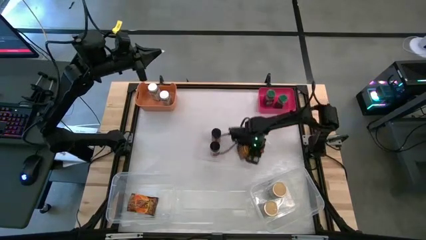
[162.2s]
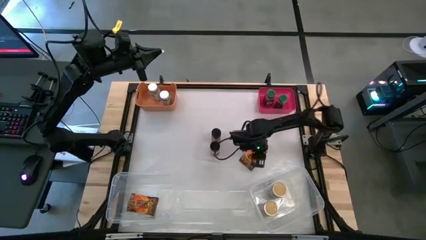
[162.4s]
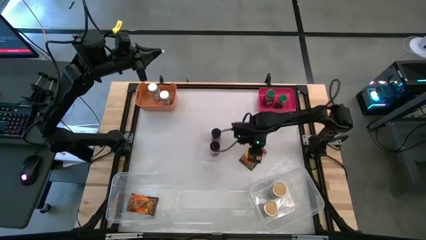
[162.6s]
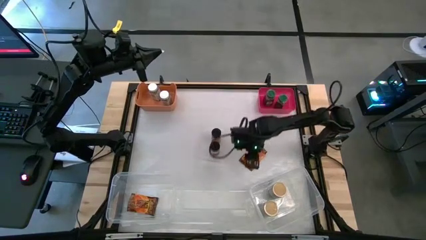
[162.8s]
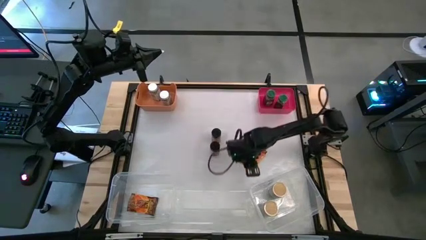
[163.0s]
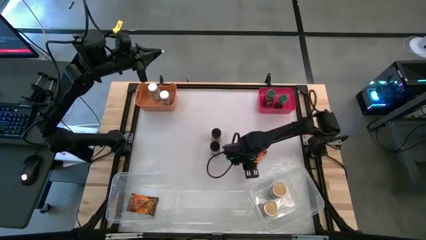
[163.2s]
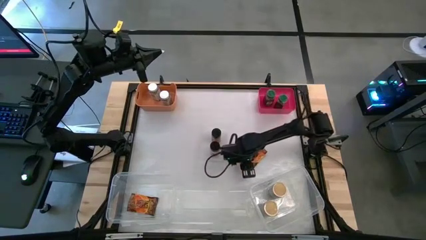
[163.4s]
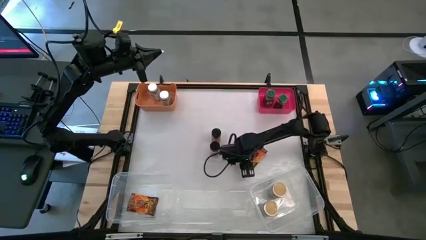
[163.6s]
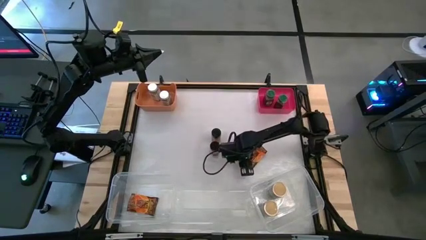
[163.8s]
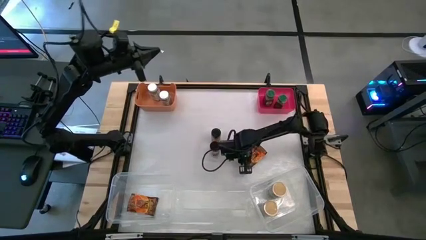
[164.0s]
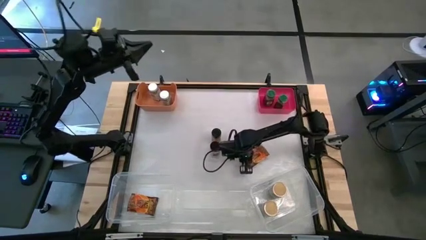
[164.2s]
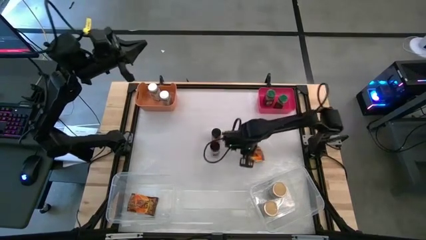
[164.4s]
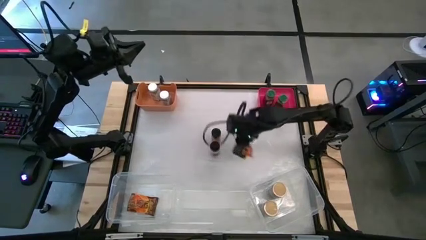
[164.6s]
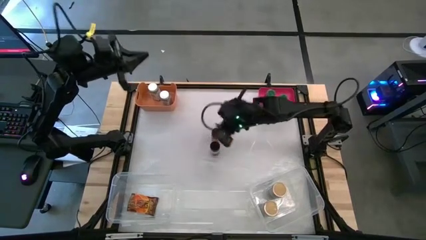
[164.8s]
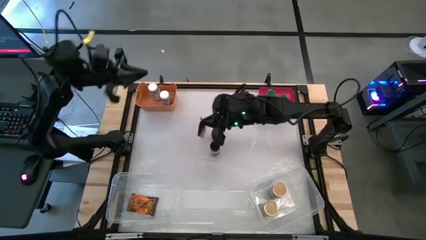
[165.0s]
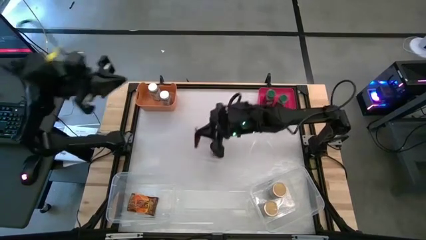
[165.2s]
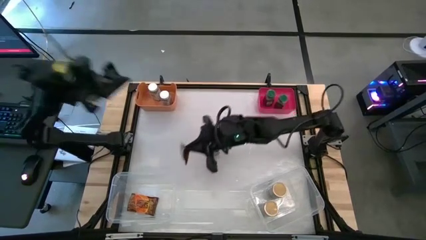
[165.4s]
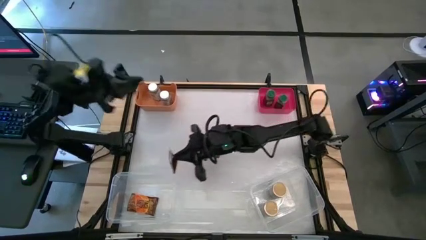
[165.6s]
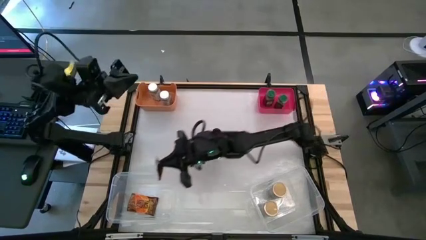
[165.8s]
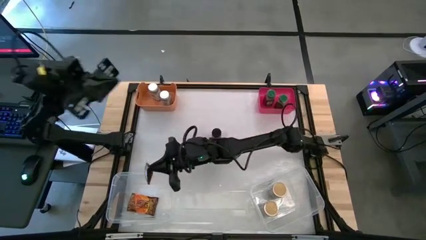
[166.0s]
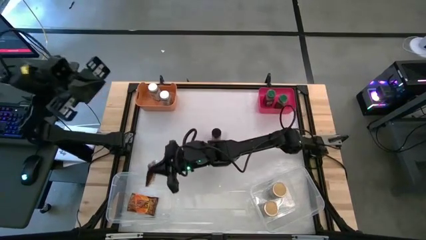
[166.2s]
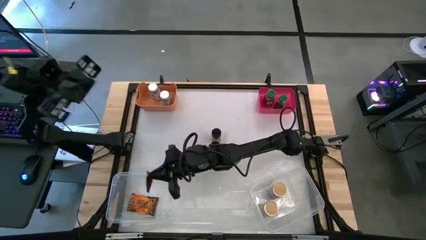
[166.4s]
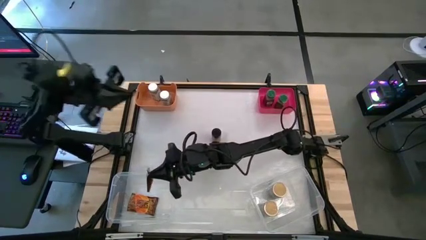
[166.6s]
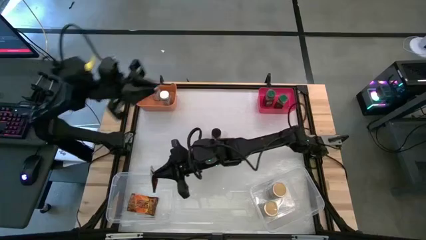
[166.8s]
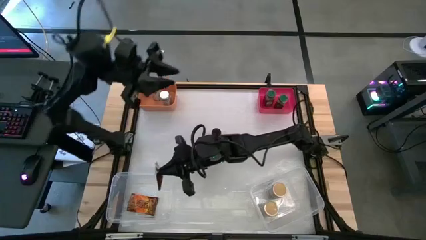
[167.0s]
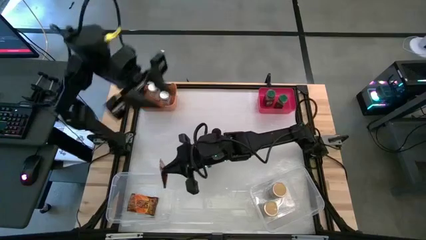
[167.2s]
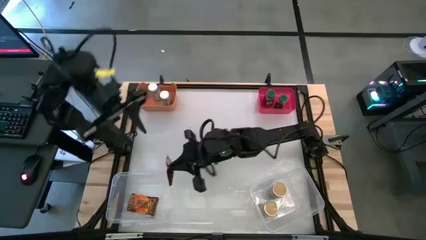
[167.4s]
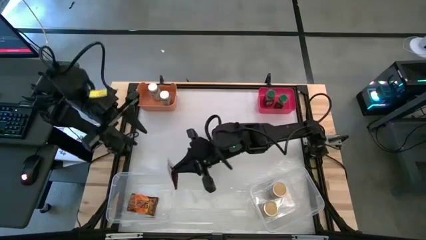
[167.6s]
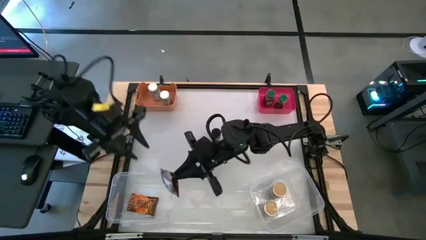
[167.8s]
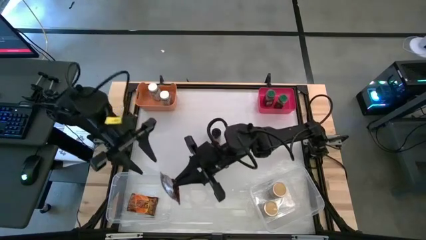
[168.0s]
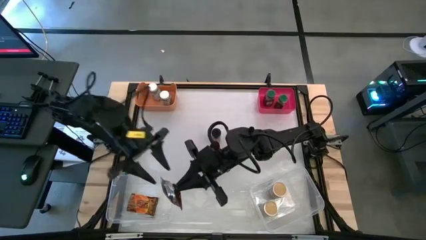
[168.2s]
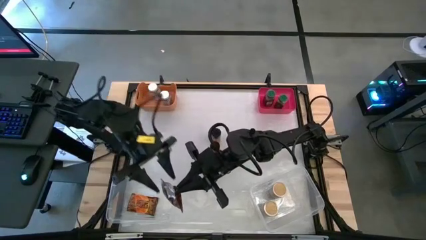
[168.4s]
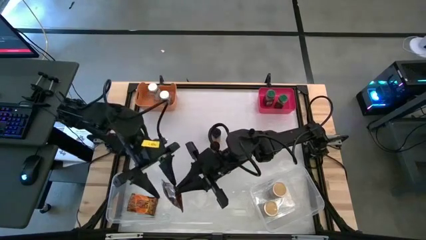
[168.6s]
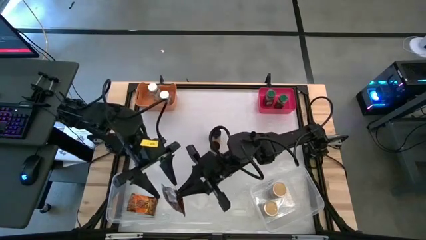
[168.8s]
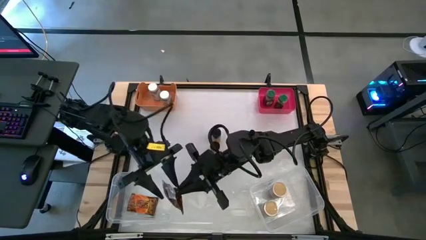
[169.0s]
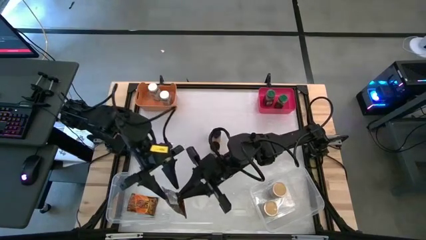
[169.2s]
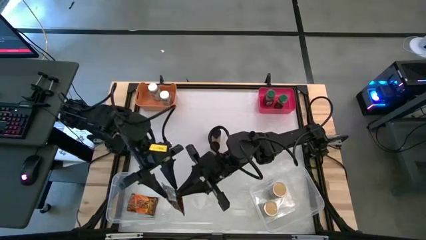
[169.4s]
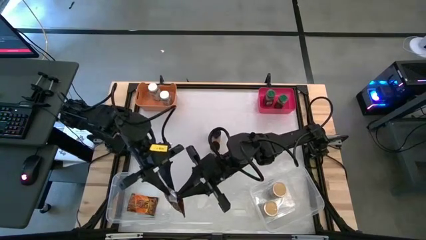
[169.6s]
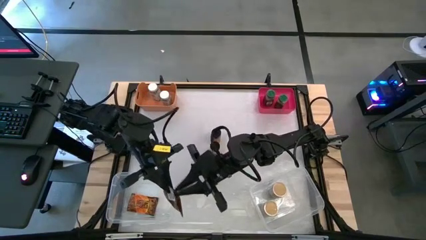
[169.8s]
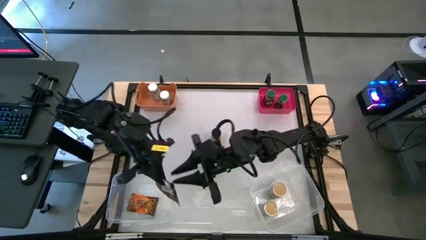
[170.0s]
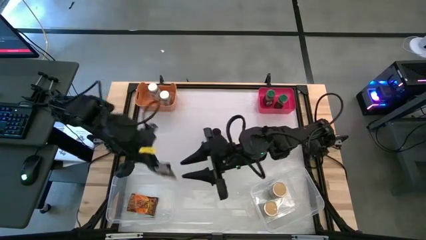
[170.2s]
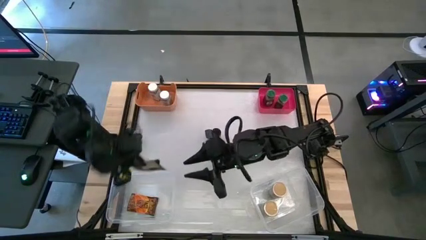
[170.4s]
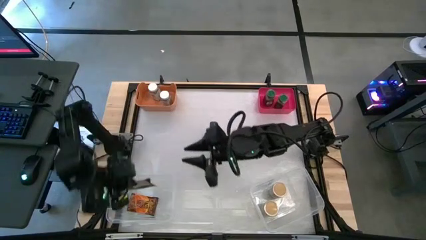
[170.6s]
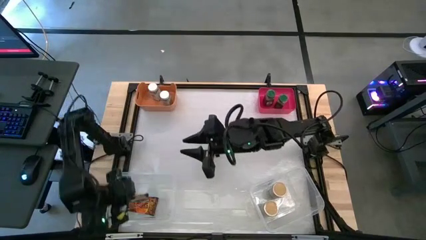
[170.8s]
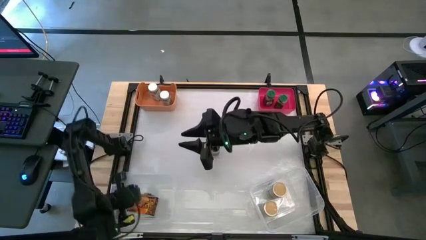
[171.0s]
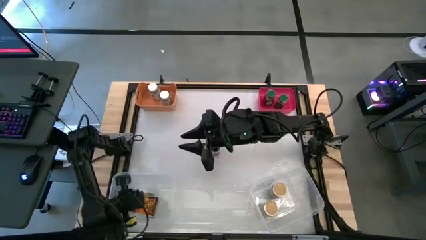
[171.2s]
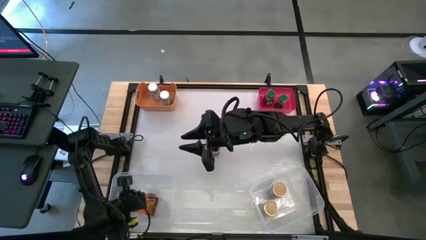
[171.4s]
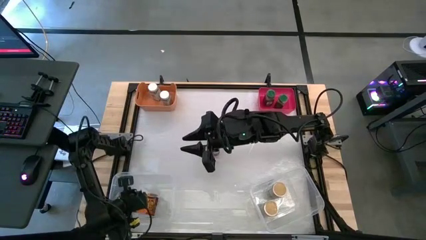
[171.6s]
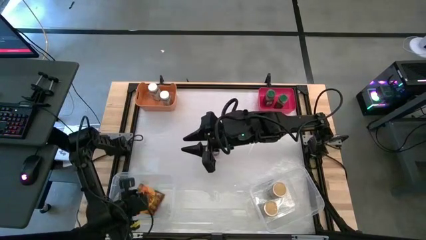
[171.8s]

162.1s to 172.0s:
Task: Sort spices by type
Put the orange seasoning bag into the left transparent bin

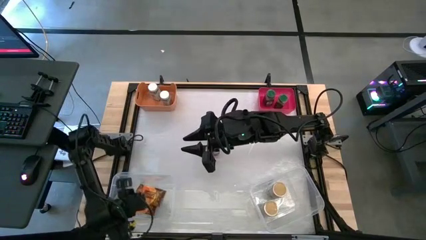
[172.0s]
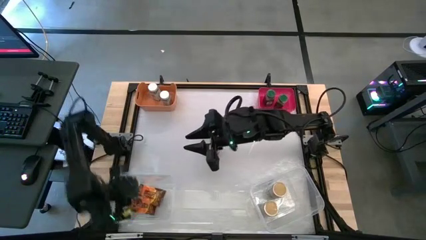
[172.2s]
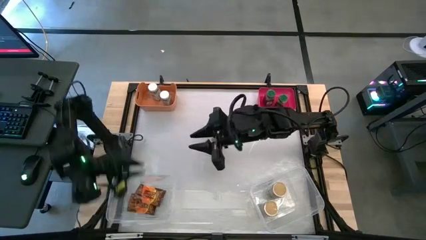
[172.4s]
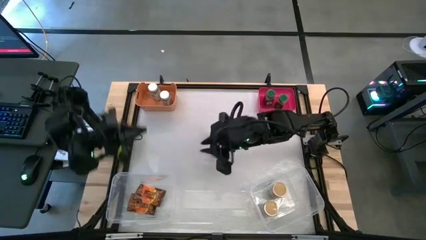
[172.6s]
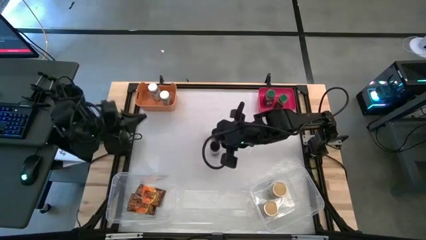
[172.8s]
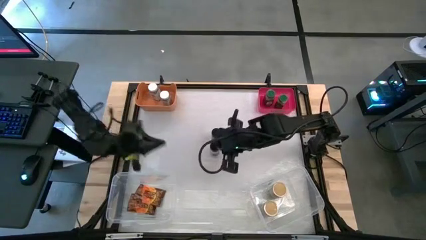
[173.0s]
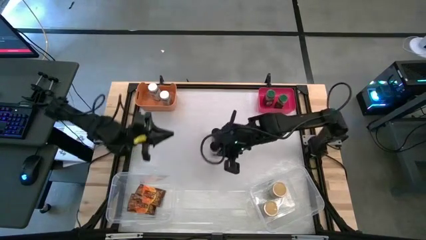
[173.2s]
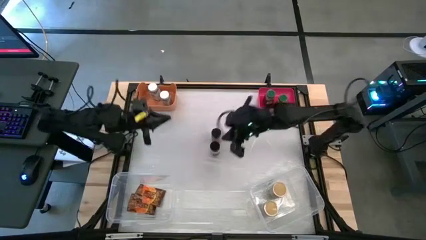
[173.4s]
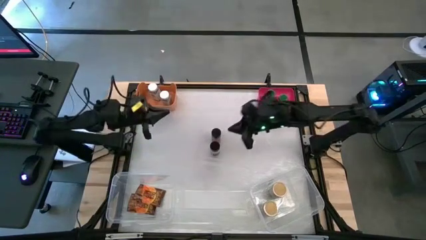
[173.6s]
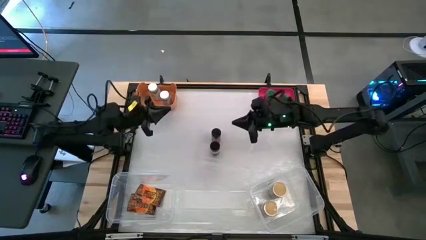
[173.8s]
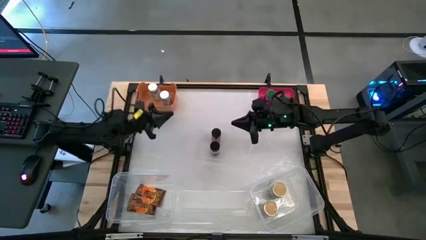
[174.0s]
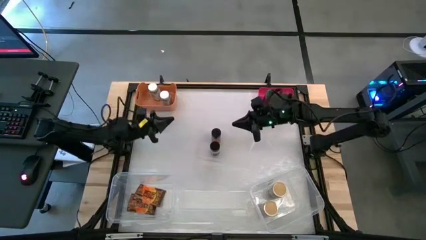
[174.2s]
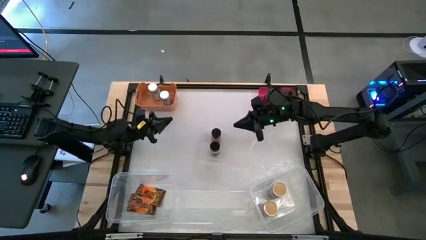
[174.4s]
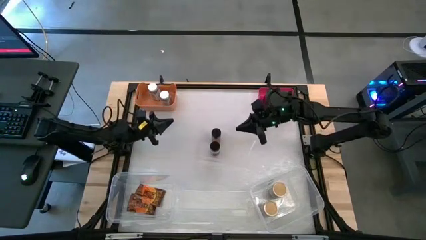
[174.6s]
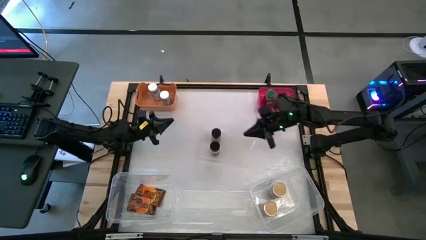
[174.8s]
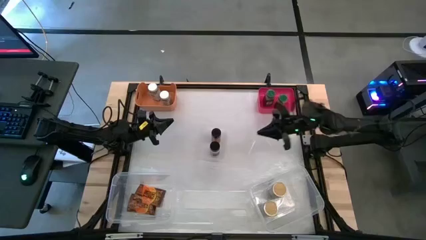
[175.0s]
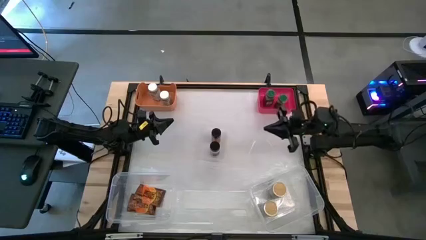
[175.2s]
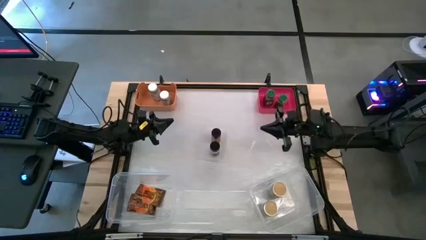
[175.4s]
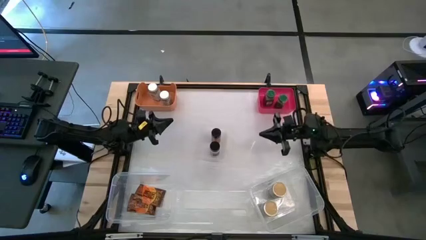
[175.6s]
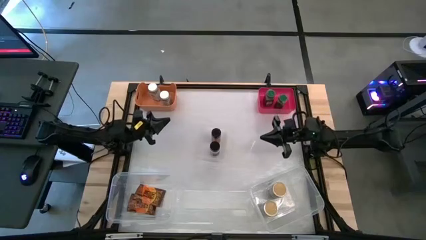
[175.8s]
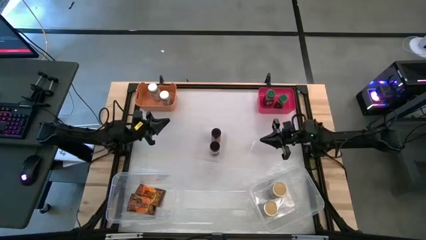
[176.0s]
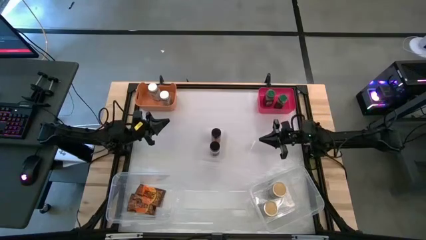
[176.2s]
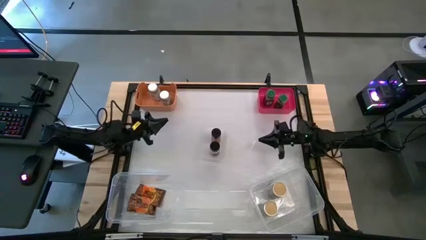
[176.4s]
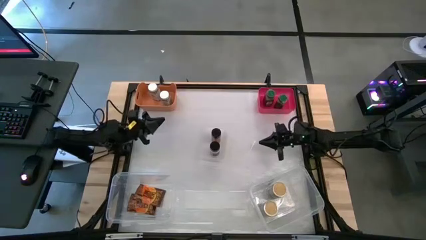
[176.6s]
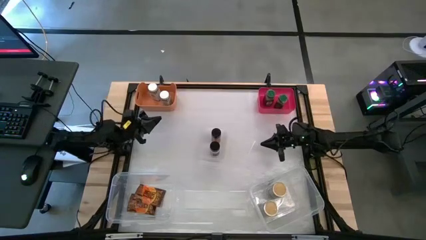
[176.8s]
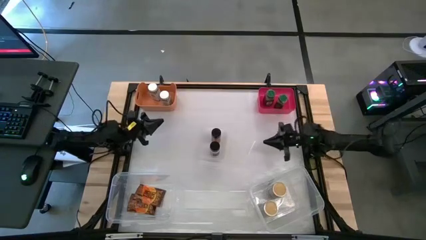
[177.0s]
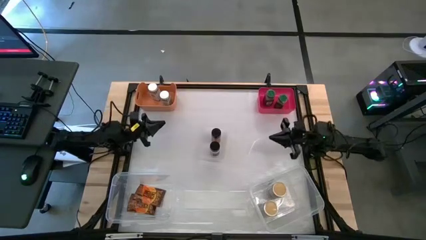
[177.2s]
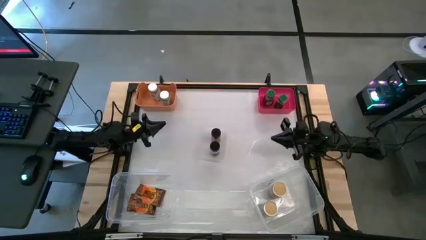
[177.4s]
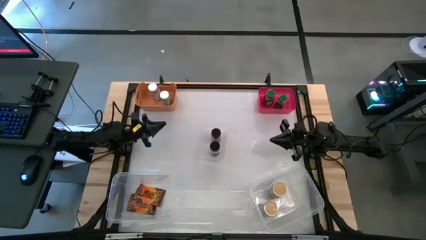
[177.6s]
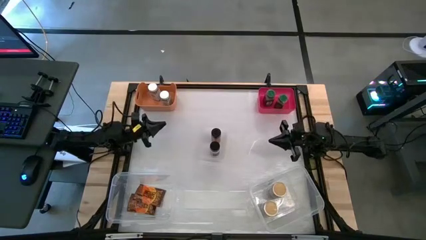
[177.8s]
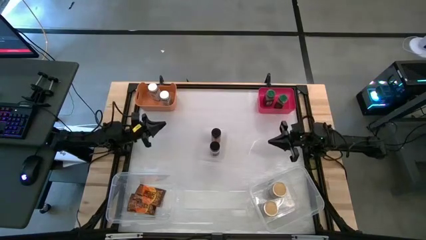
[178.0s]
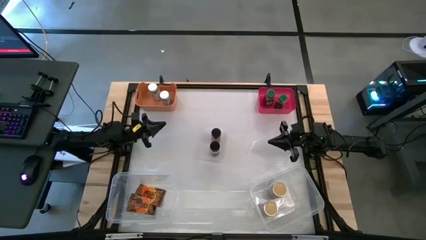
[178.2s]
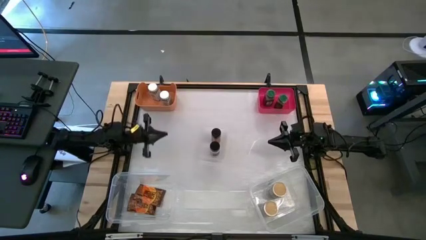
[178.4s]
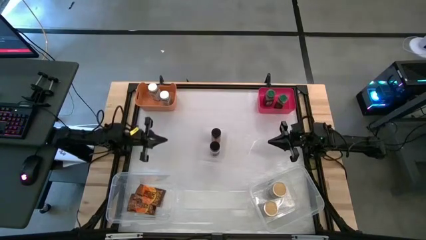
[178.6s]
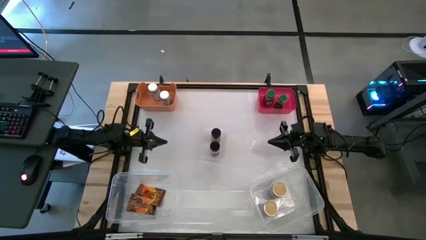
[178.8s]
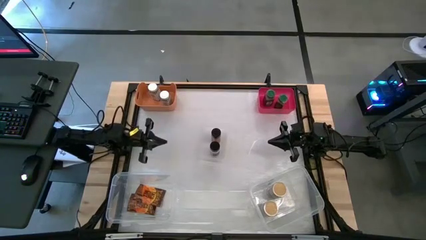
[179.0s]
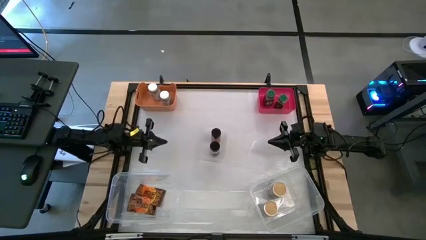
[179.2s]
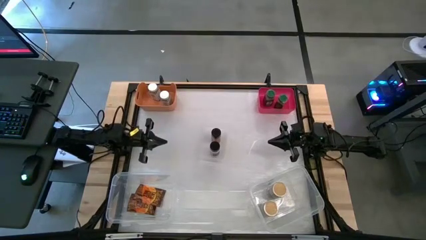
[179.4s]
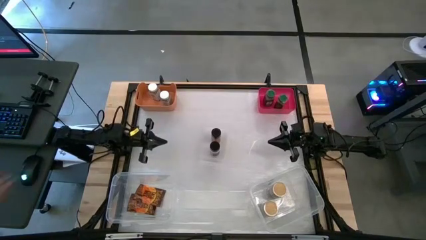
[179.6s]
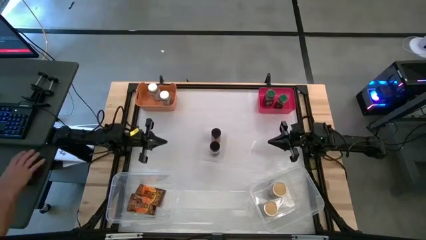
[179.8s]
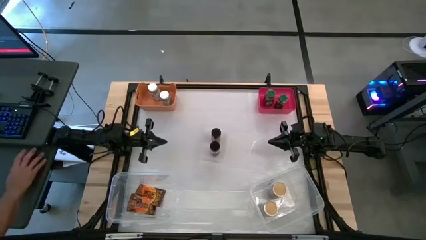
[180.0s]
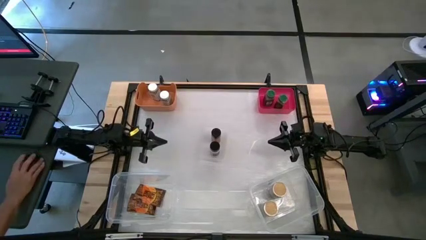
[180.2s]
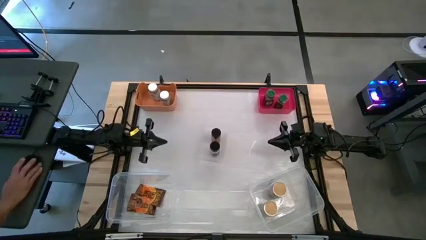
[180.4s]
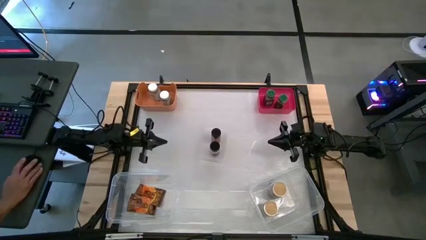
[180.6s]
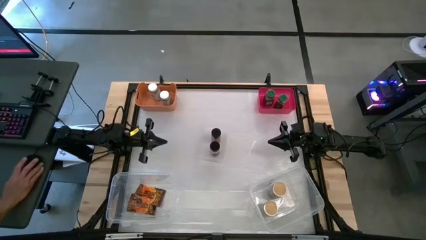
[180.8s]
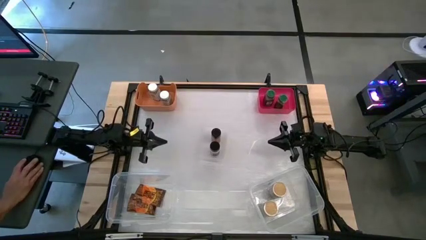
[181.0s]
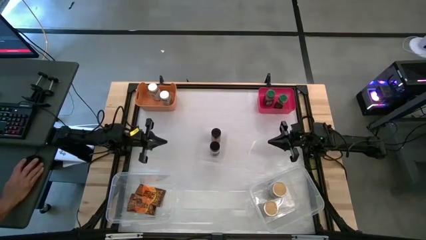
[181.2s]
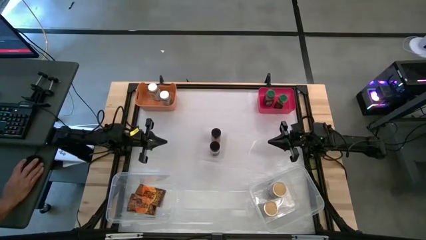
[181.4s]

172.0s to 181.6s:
Return to Home Position
